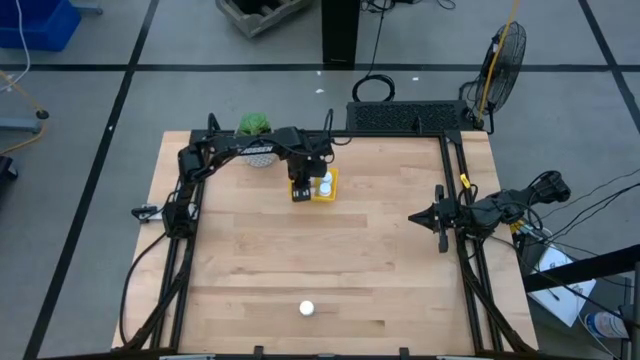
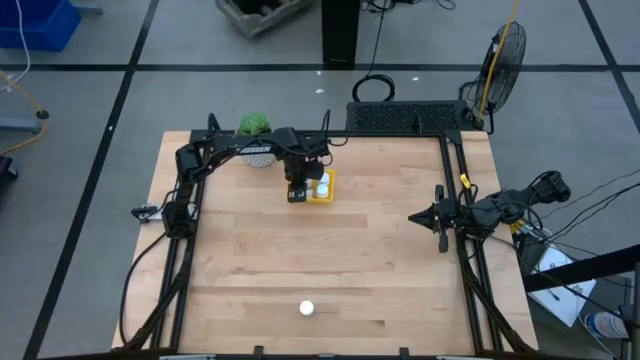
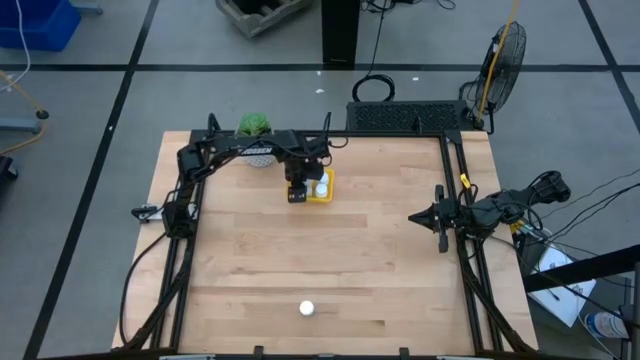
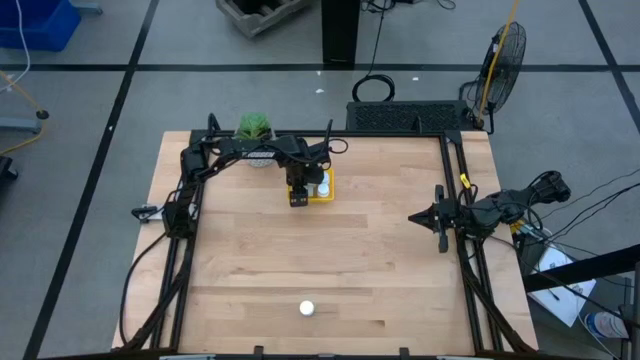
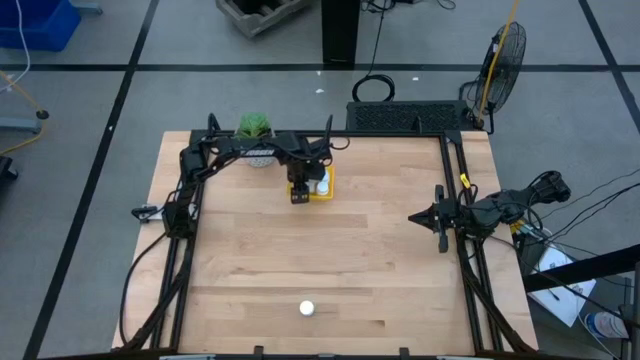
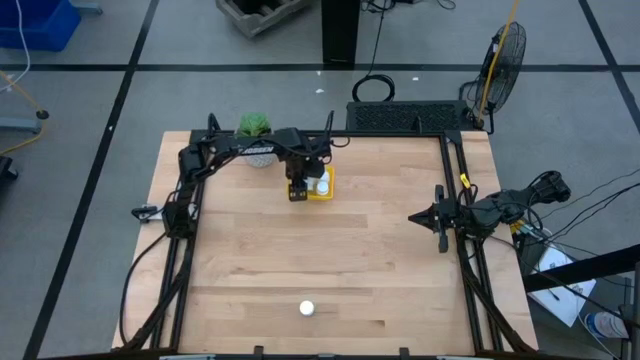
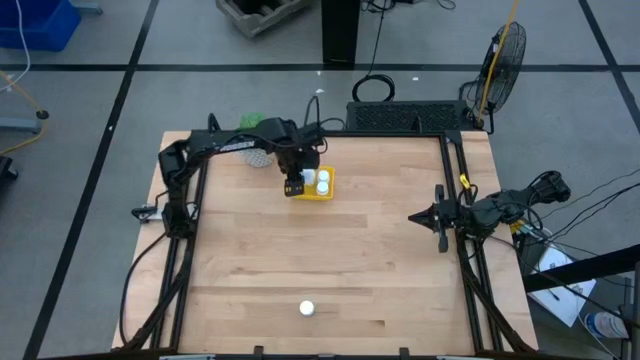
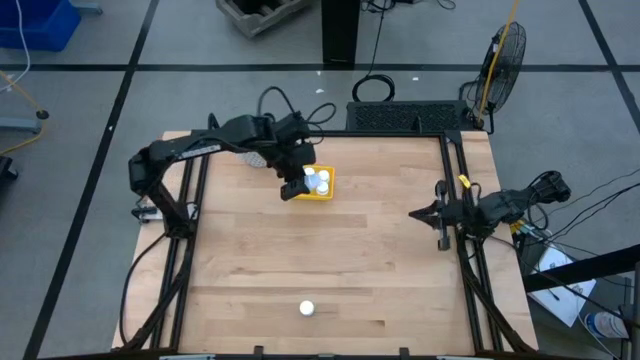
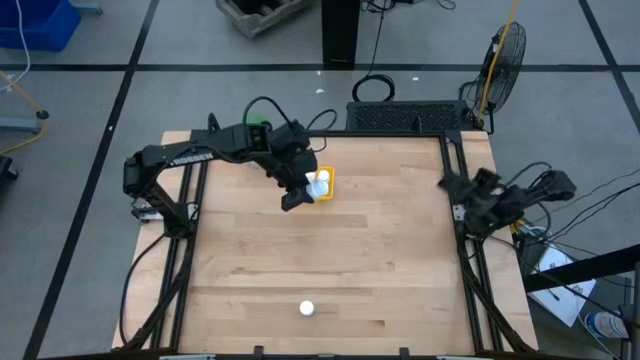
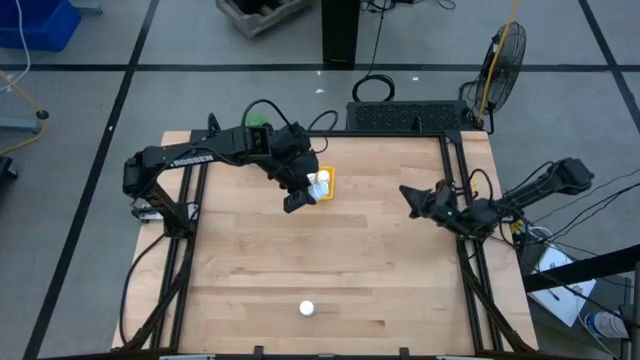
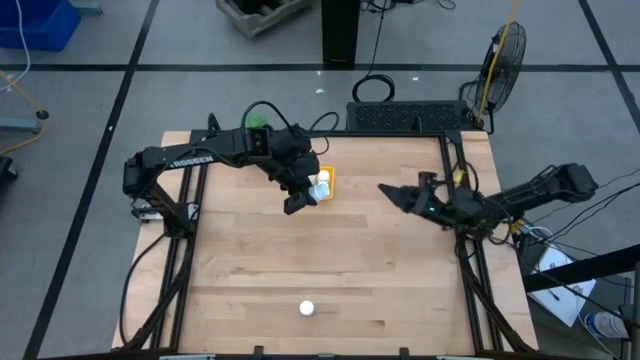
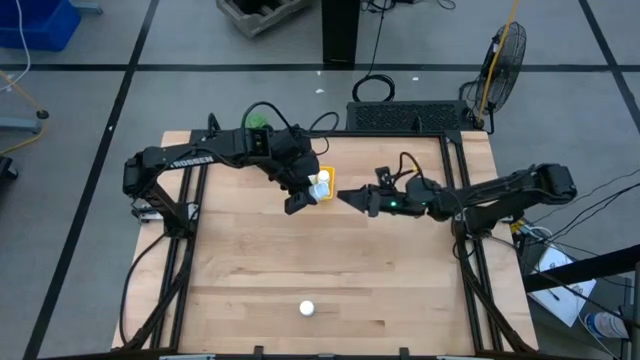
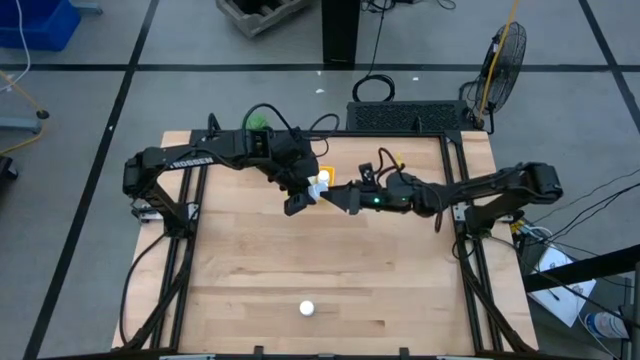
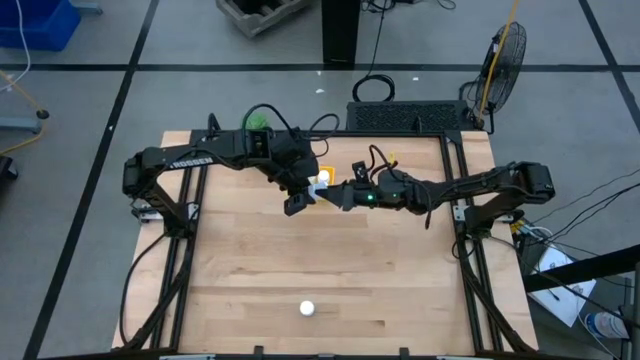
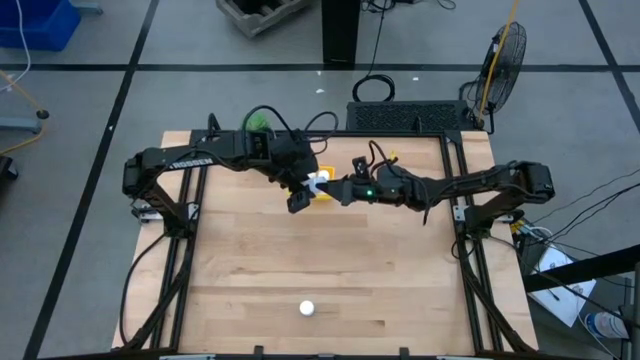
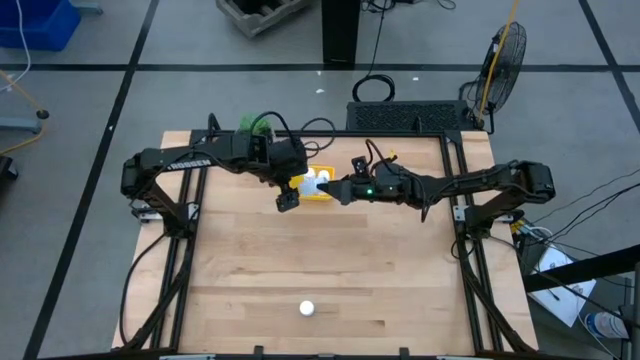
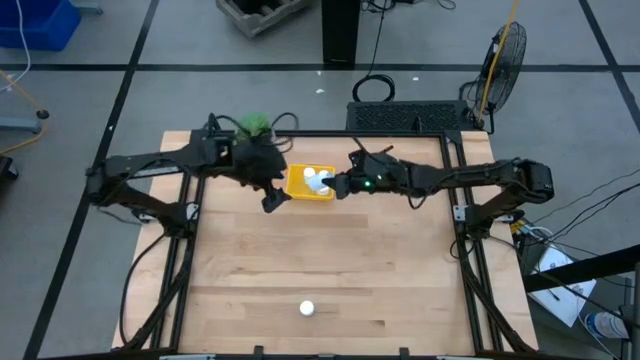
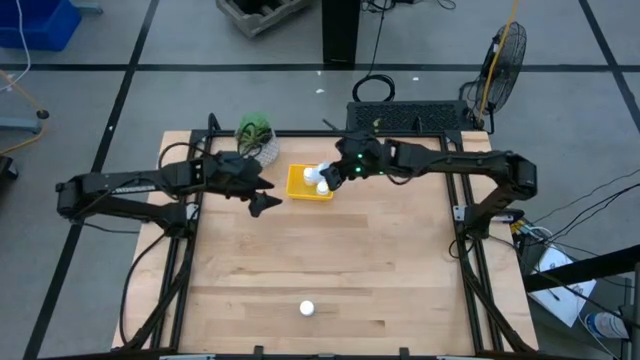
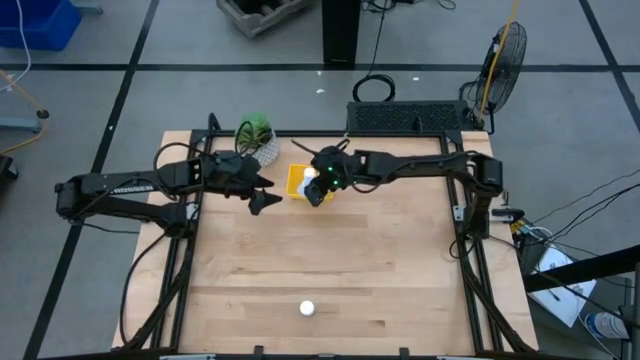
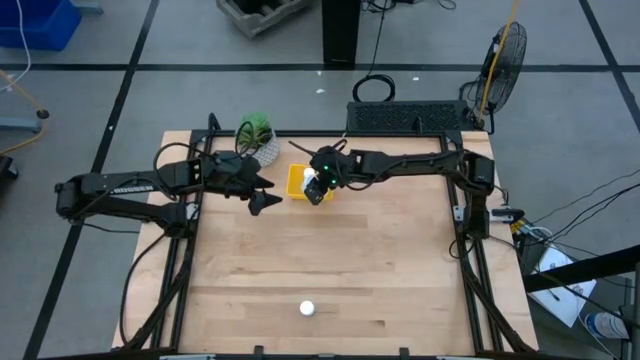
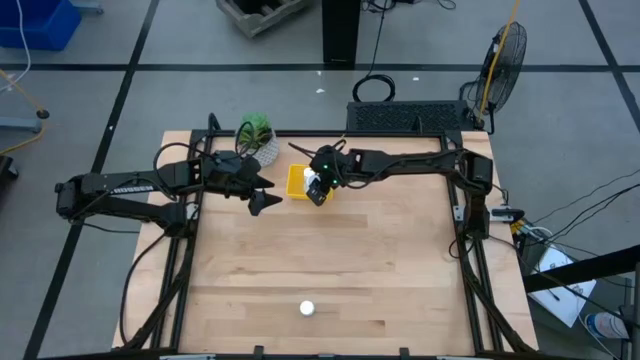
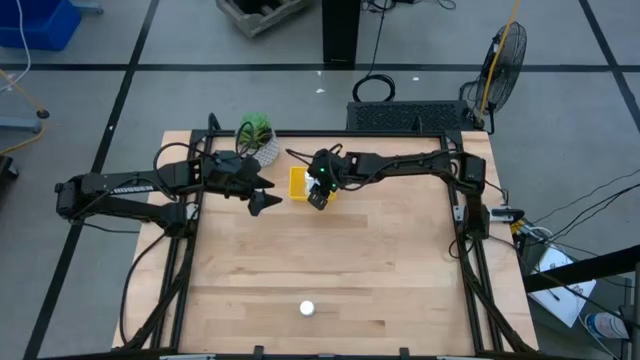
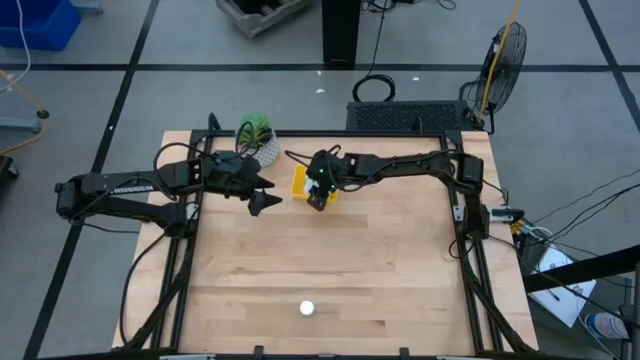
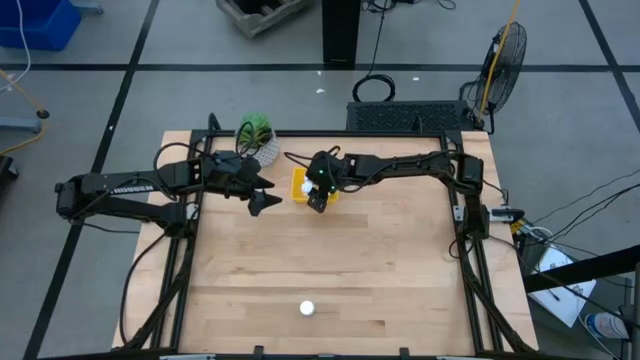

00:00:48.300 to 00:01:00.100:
Task: Pick and place pill bottles into a basket
Put the top white pill bottle into the yellow basket

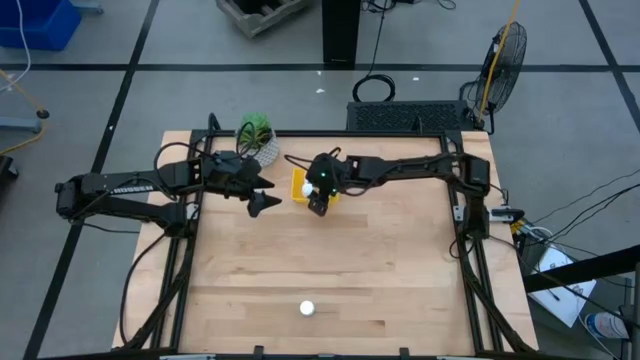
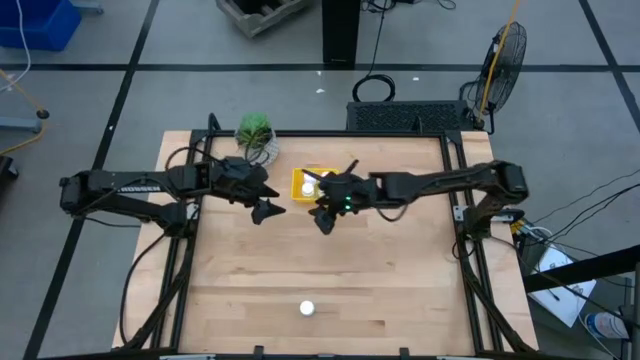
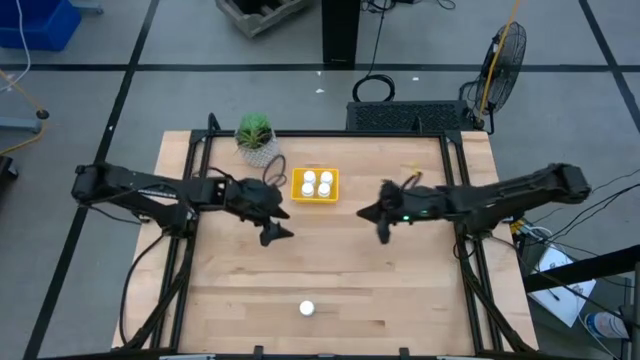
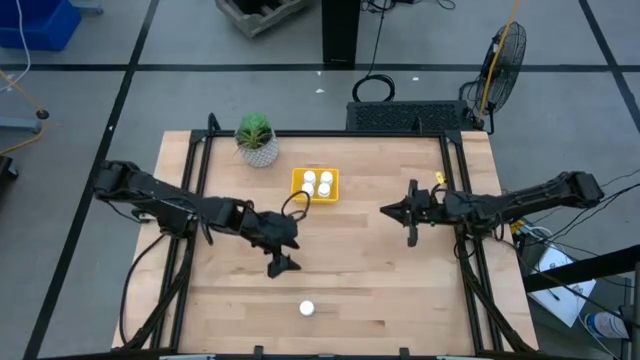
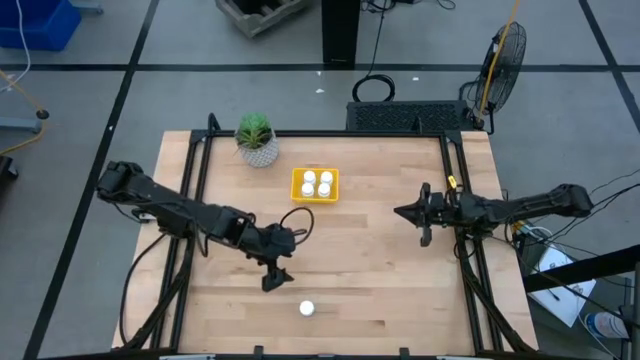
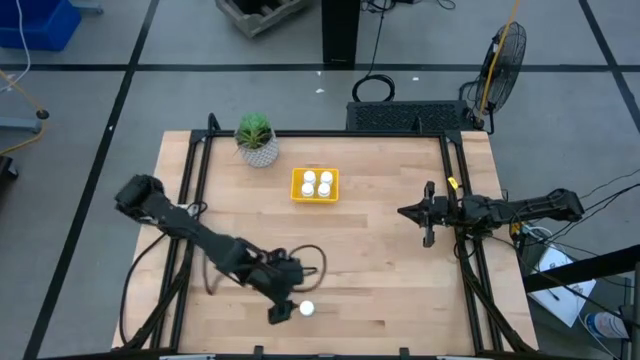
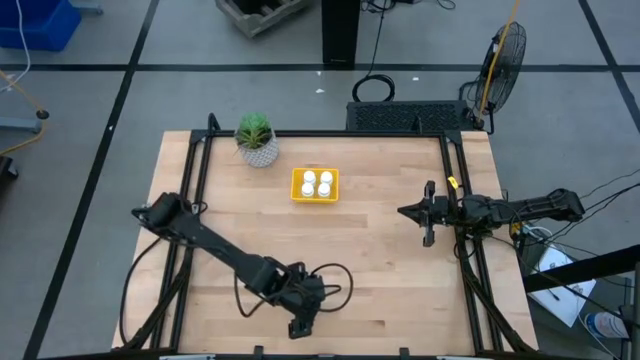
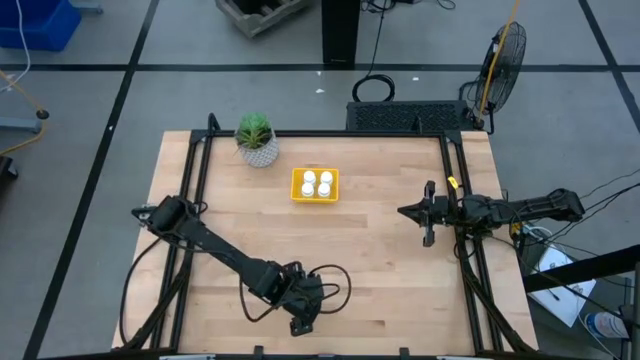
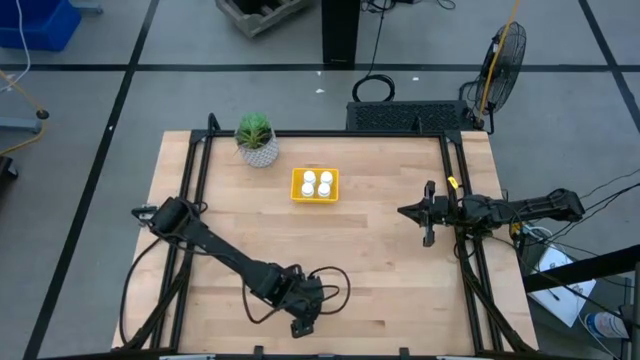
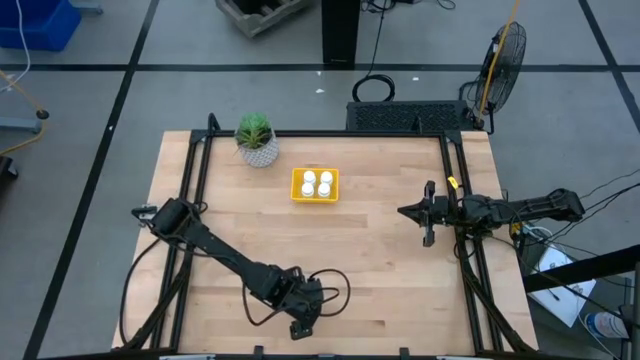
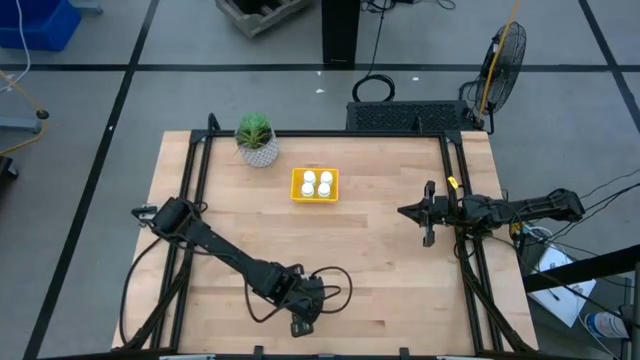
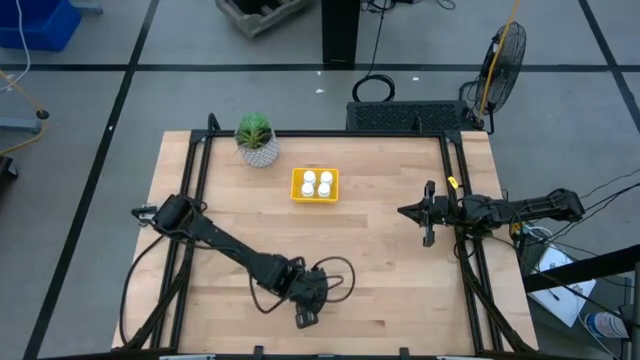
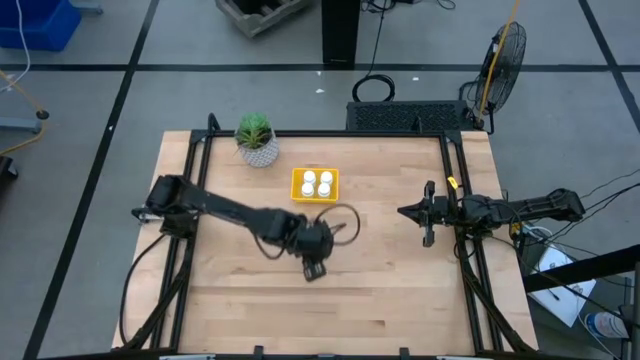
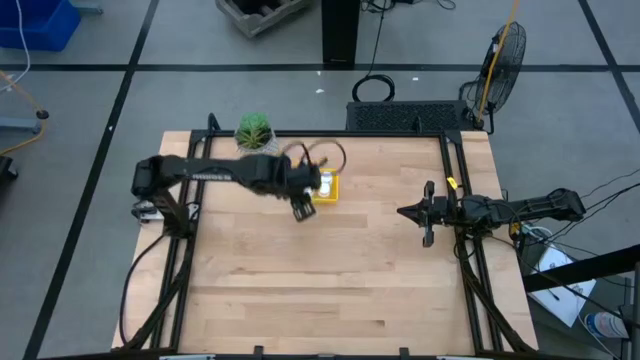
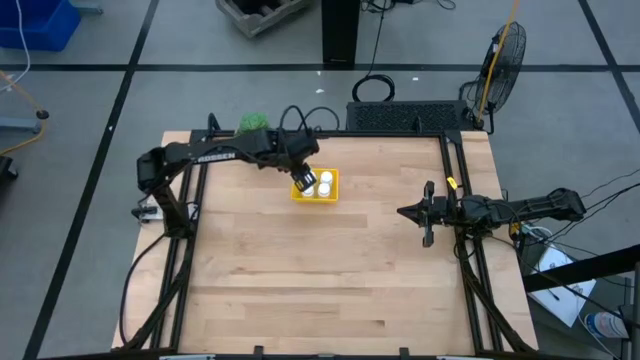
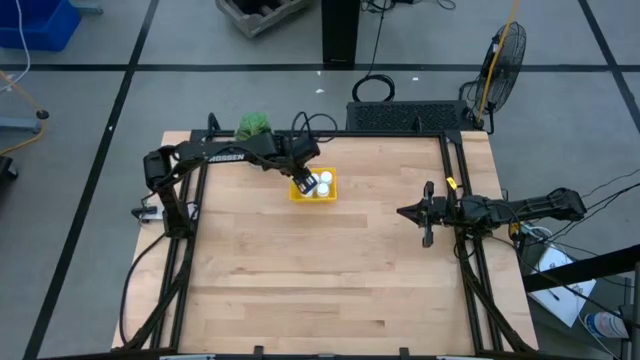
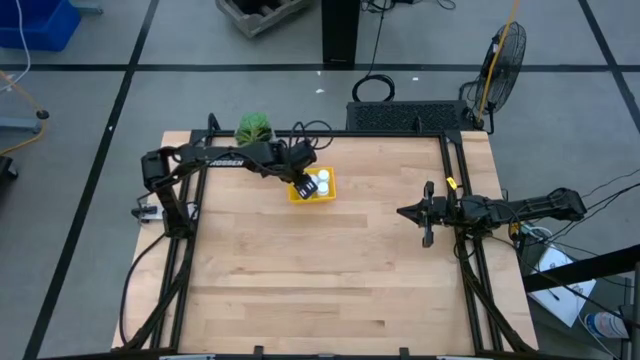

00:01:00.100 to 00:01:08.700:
Put the white pill bottle into the yellow basket

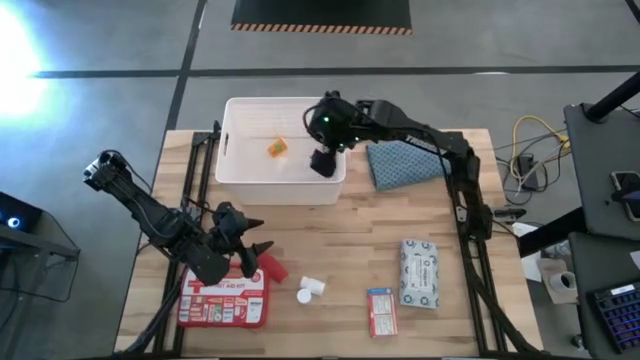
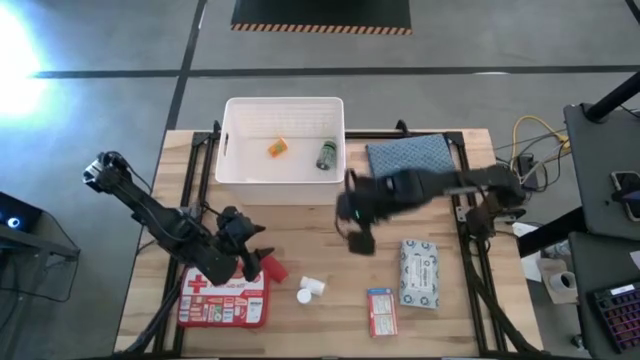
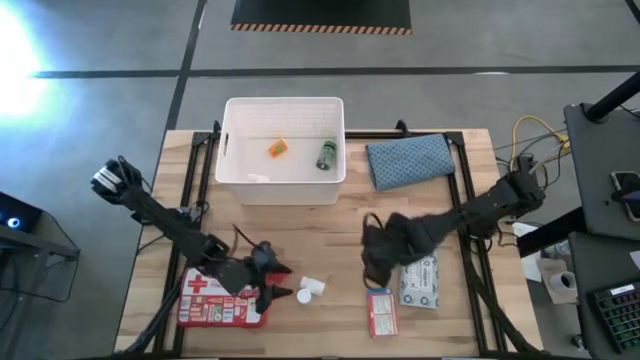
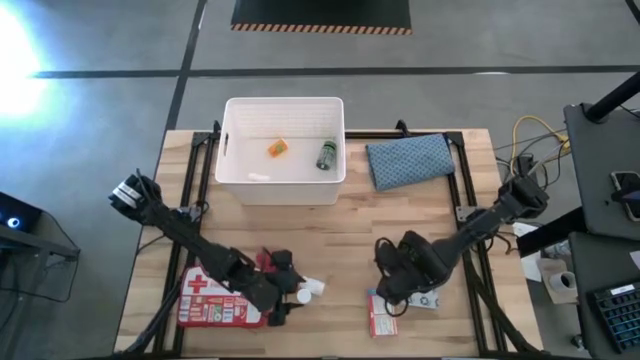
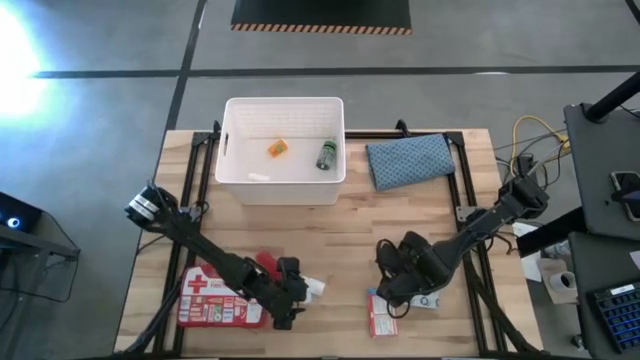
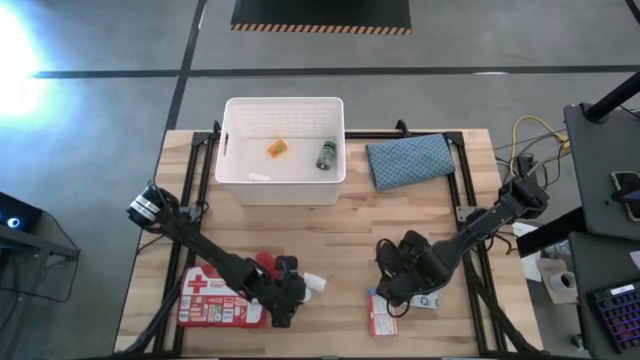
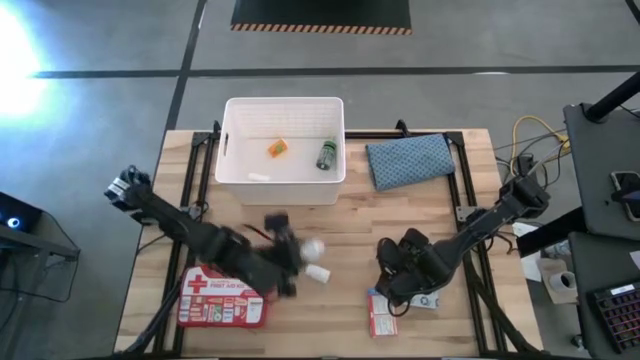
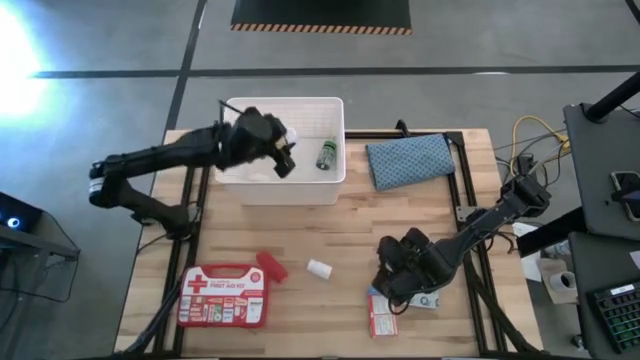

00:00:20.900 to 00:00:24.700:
Task: Pick & place medical supplies in basket/bin
Put the bottom white pill bottle into the white bin
